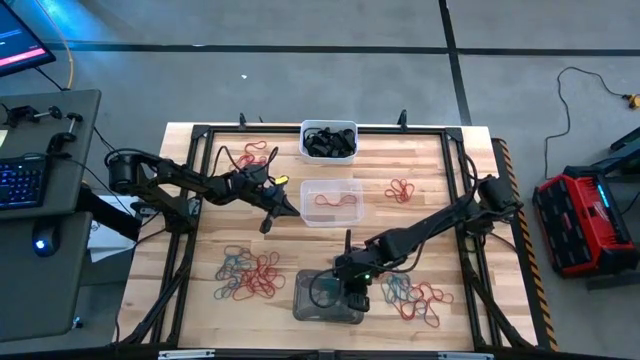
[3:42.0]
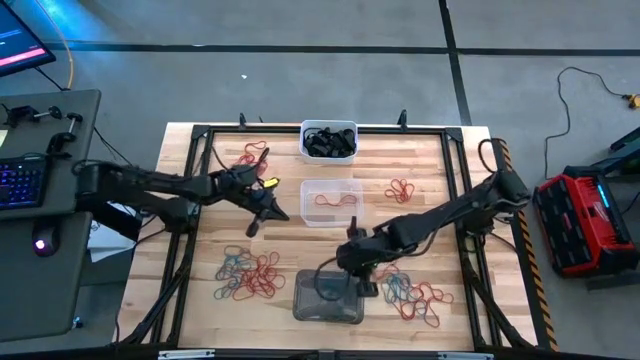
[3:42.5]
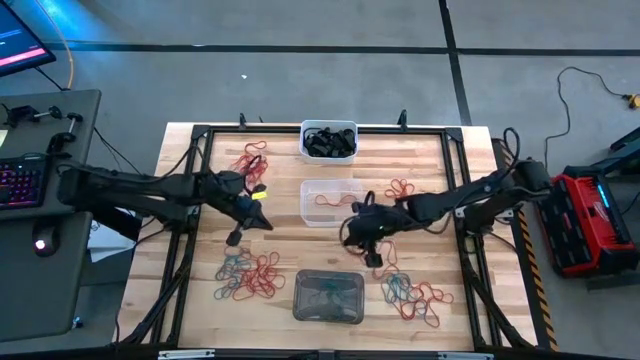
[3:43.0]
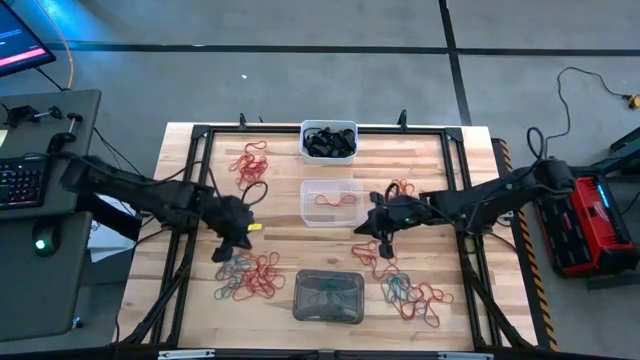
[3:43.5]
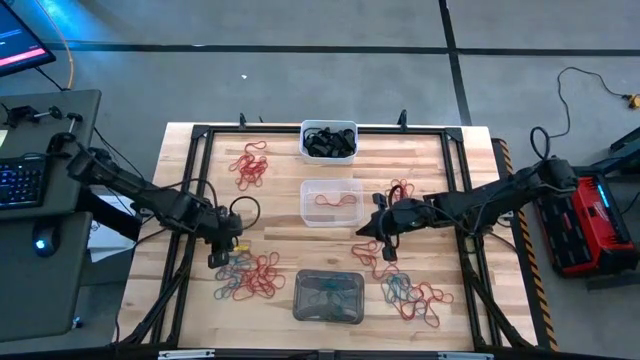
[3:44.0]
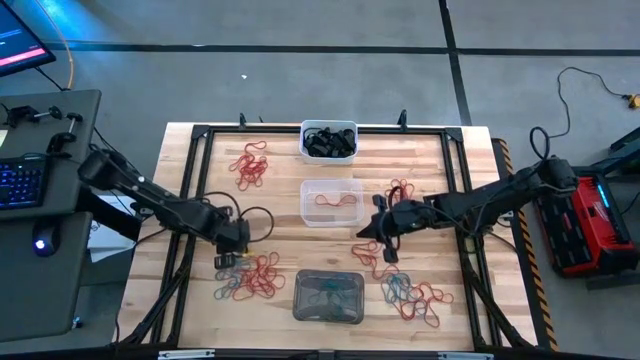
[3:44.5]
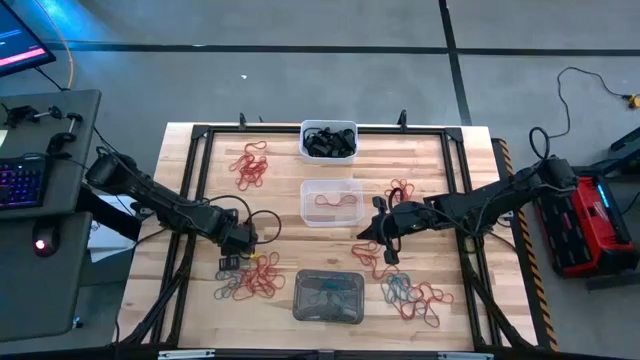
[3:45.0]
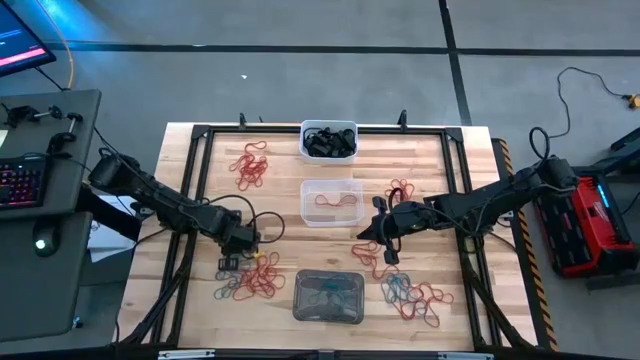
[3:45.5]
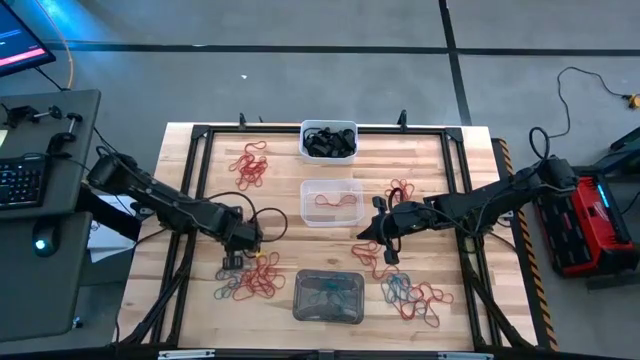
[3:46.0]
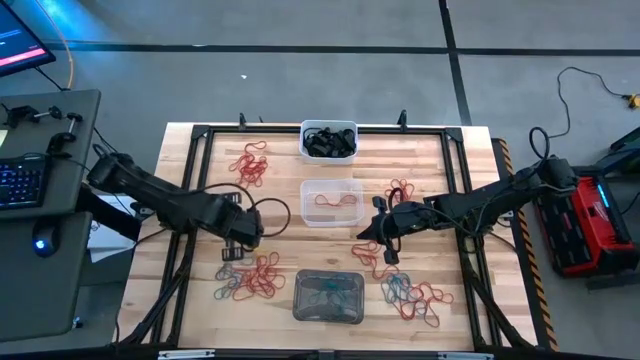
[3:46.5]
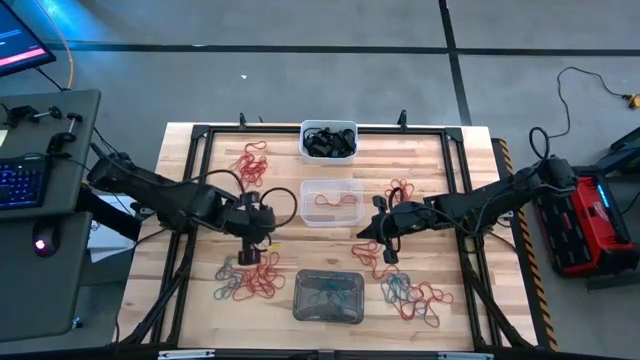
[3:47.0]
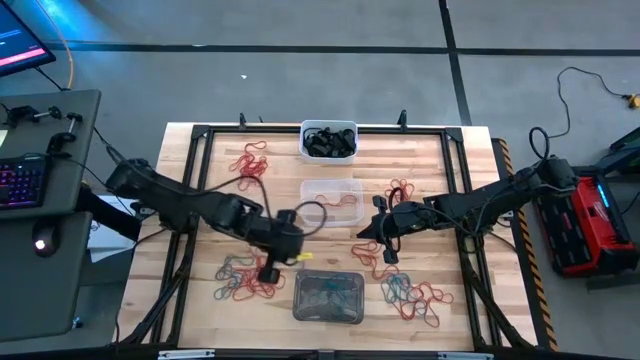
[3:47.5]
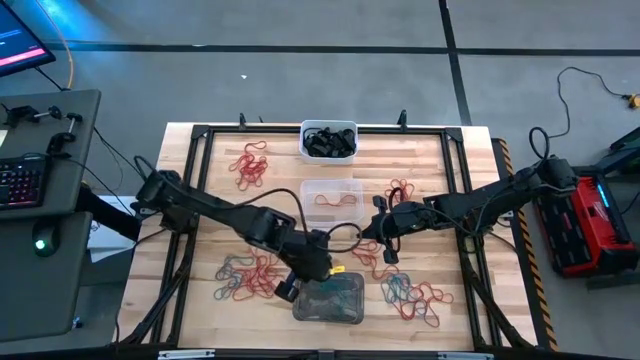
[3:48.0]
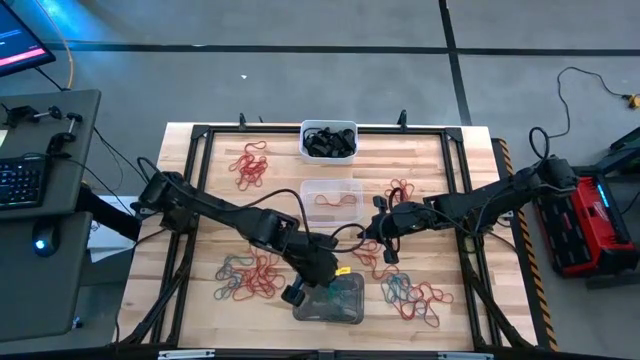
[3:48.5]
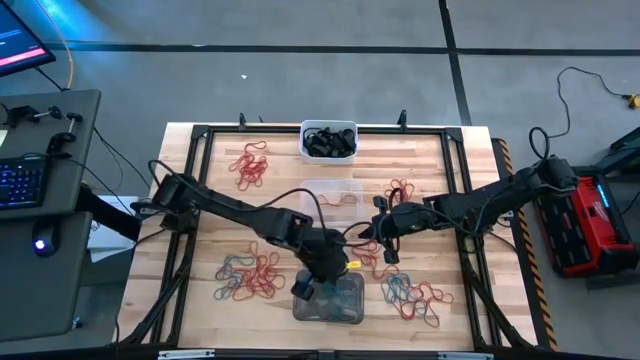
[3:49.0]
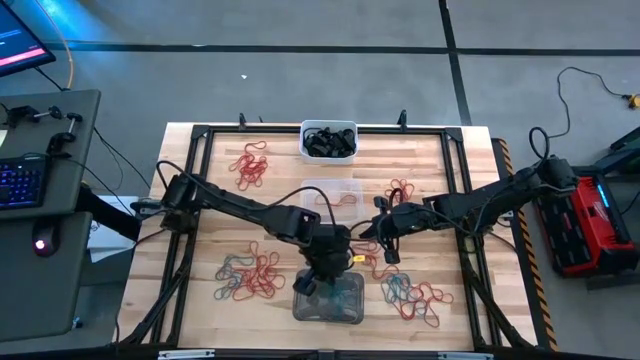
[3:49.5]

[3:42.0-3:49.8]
Task: Sort rubber bands into baskets
Put the blue rubber band into the black bin

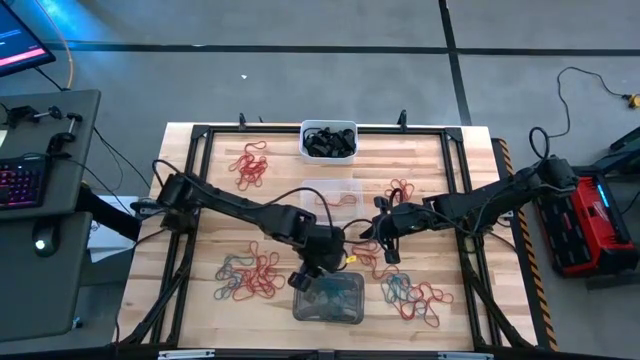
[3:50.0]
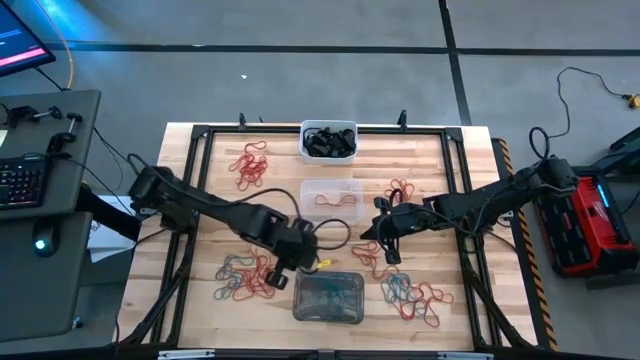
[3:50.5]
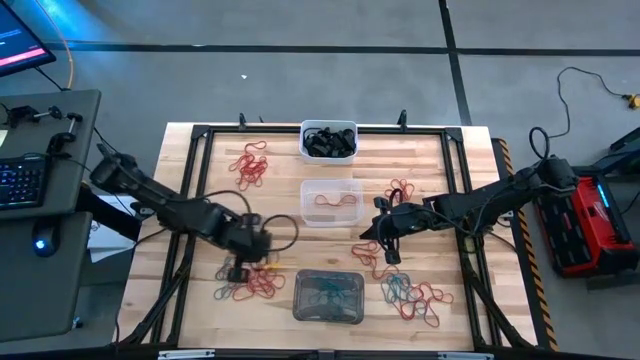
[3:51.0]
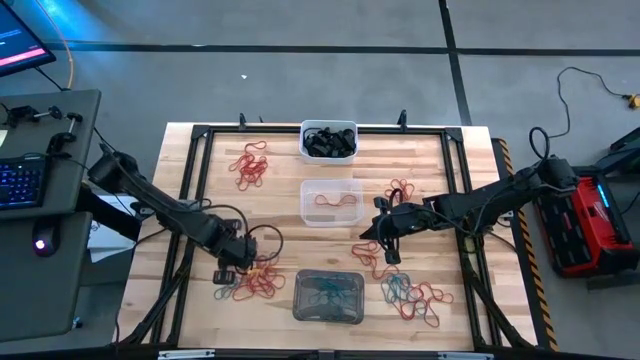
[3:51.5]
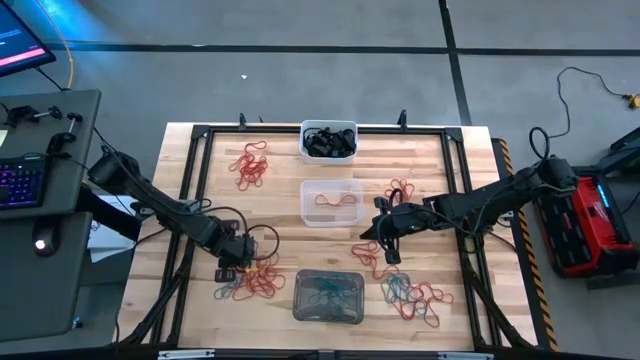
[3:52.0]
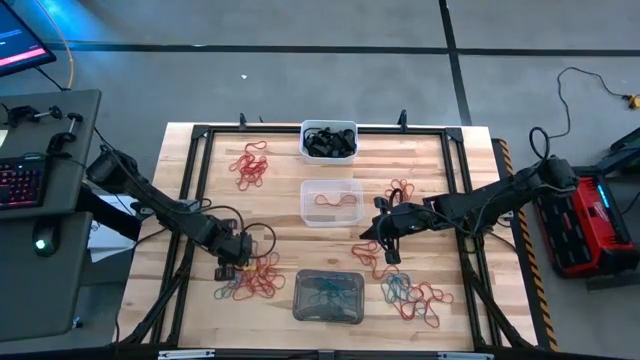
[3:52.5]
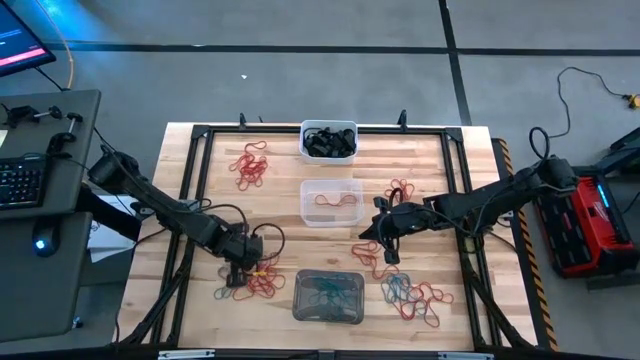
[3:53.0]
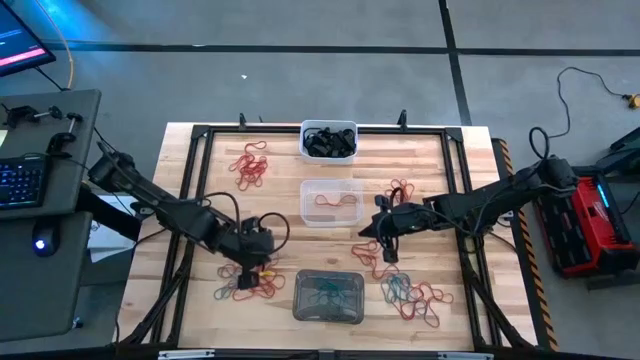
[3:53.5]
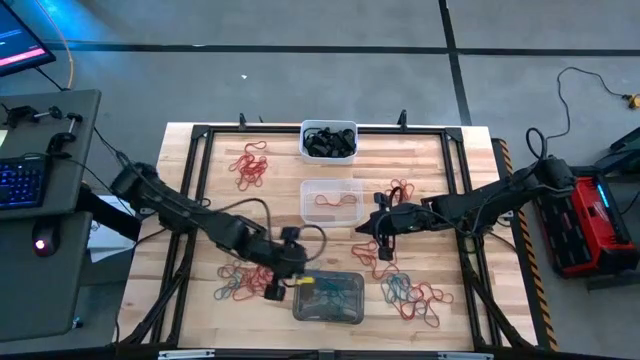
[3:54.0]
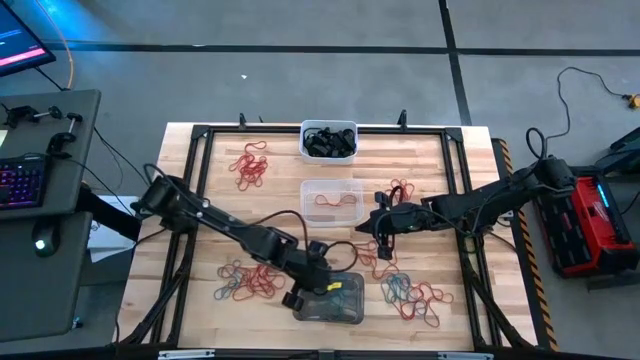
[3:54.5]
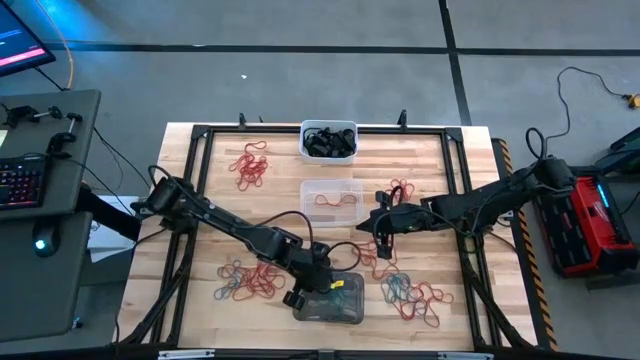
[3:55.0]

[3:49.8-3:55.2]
Put the blue rubber band into the black bin

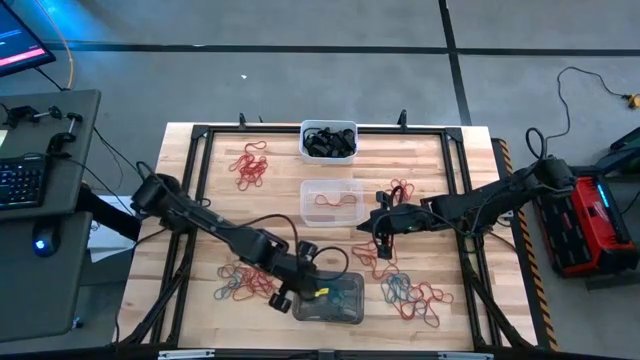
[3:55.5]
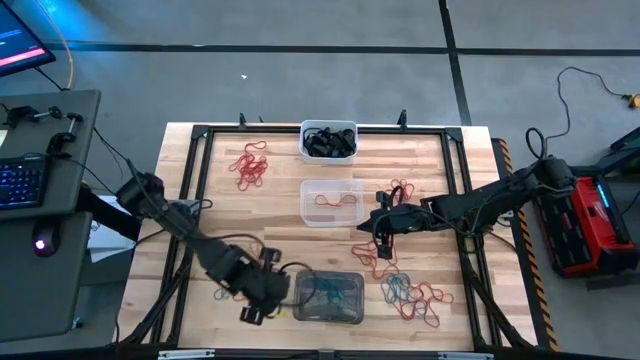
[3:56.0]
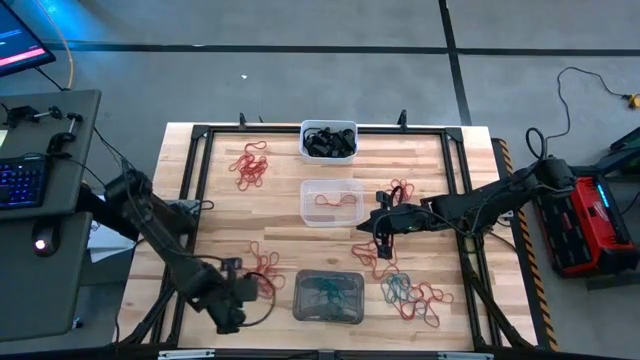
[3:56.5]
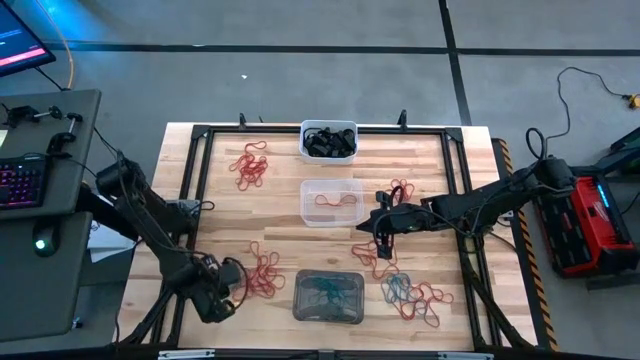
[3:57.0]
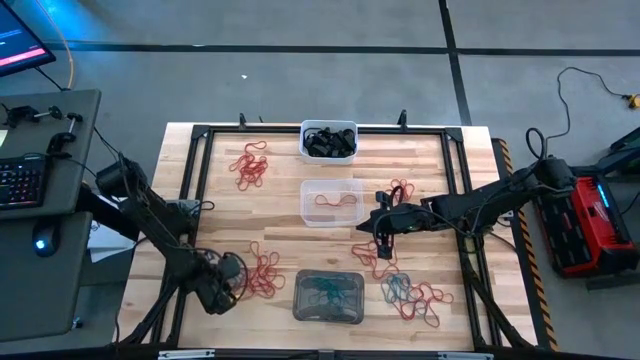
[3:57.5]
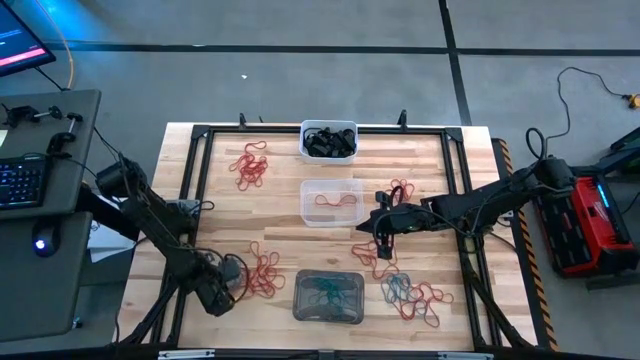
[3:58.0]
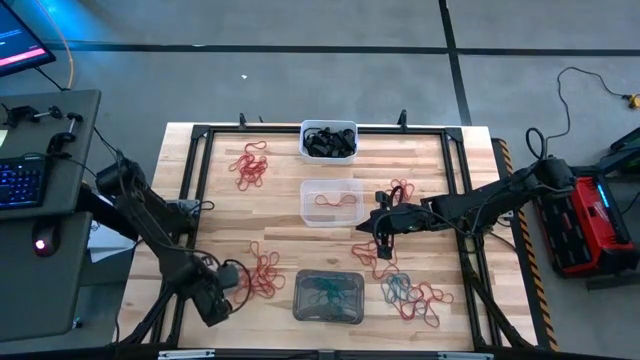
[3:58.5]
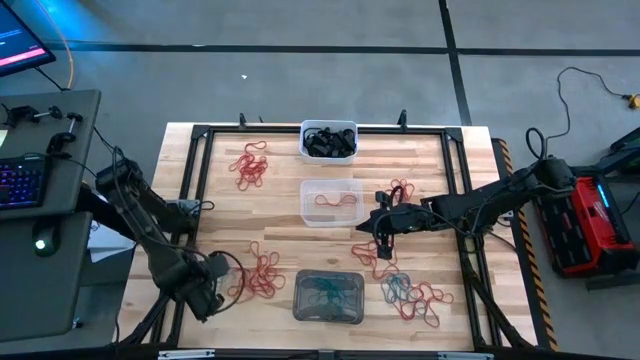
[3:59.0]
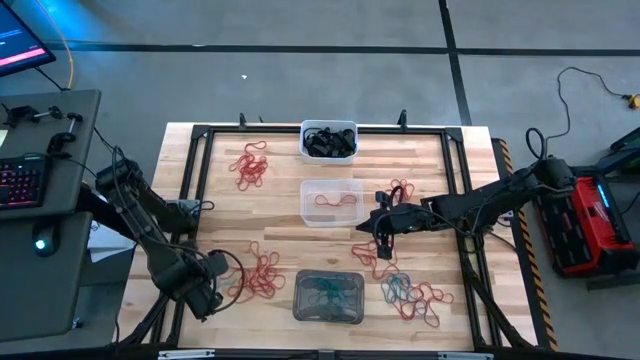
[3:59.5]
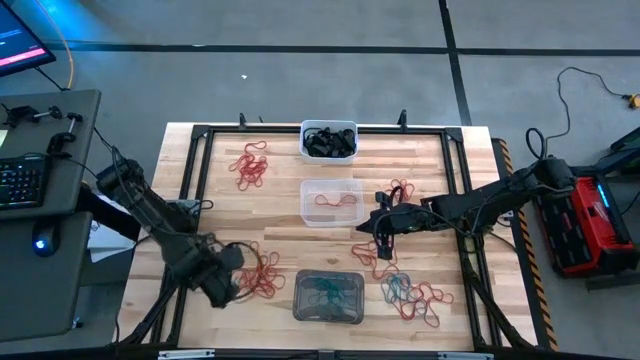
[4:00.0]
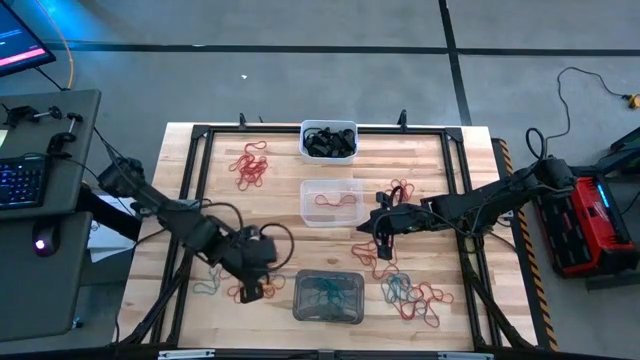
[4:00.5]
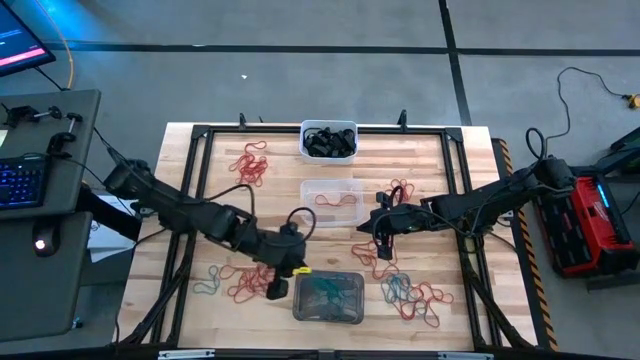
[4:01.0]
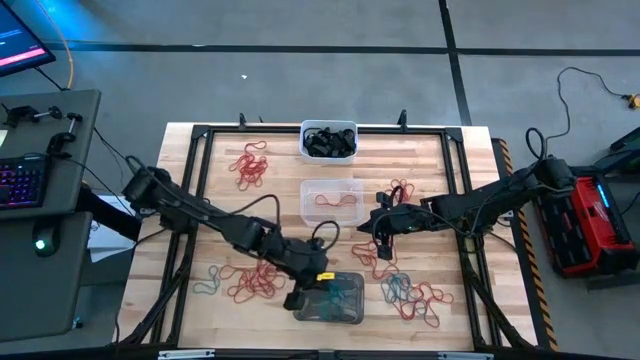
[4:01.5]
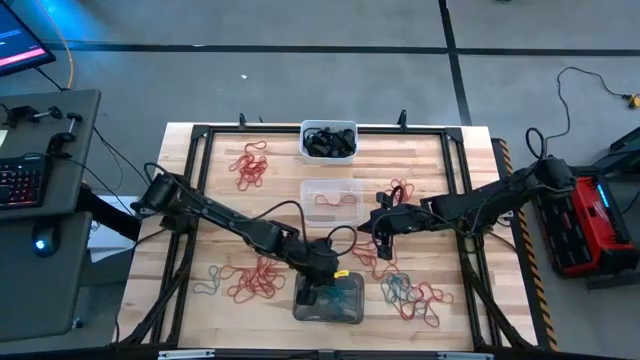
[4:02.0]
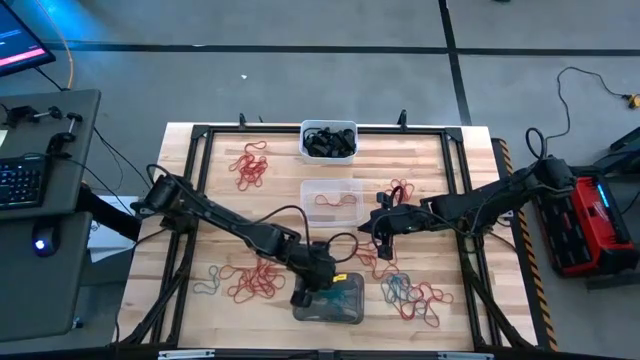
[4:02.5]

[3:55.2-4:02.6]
Put the blue rubber band into the black bin
